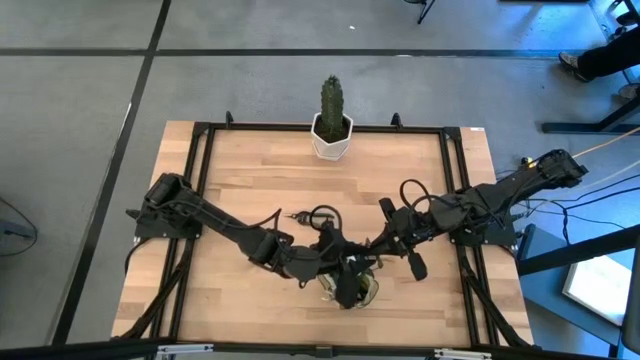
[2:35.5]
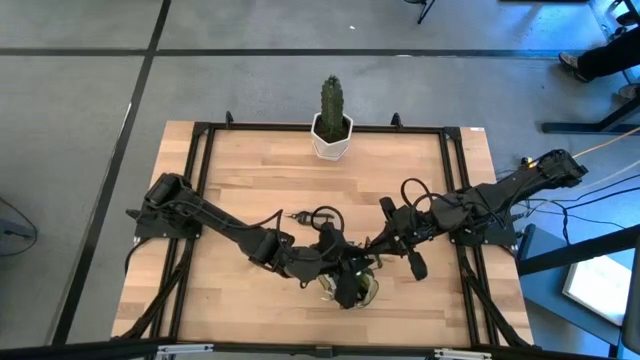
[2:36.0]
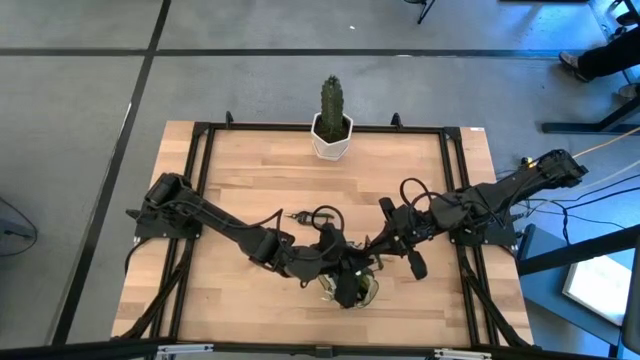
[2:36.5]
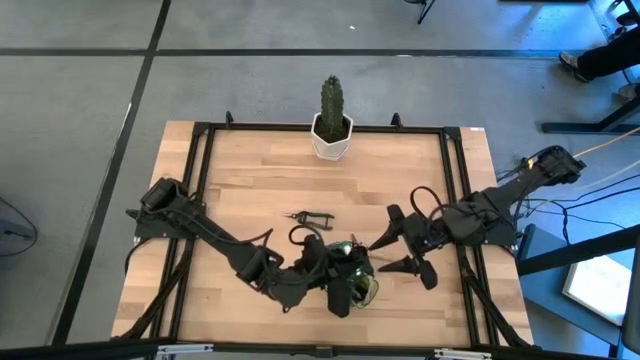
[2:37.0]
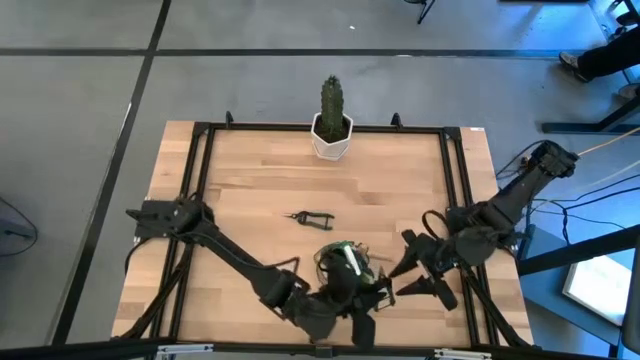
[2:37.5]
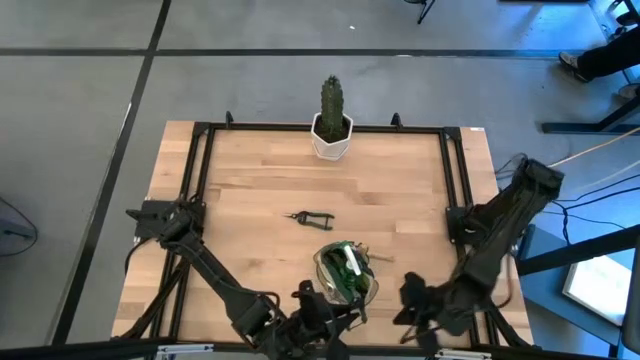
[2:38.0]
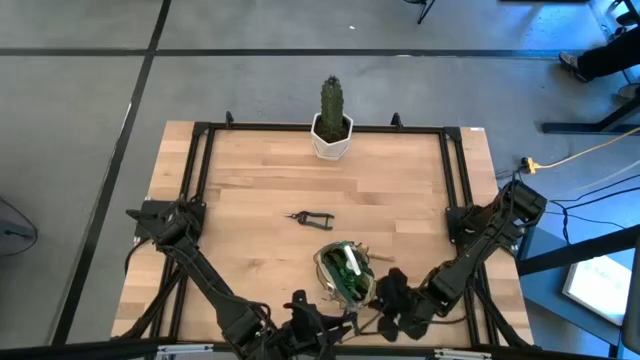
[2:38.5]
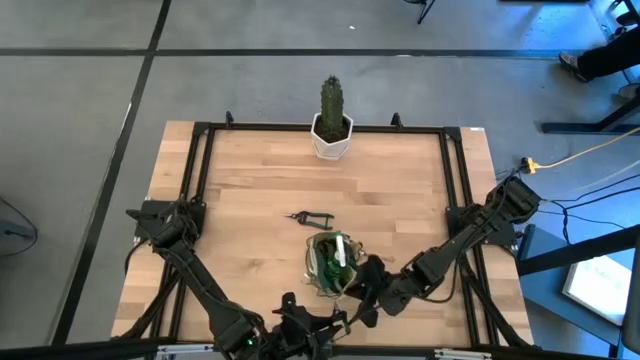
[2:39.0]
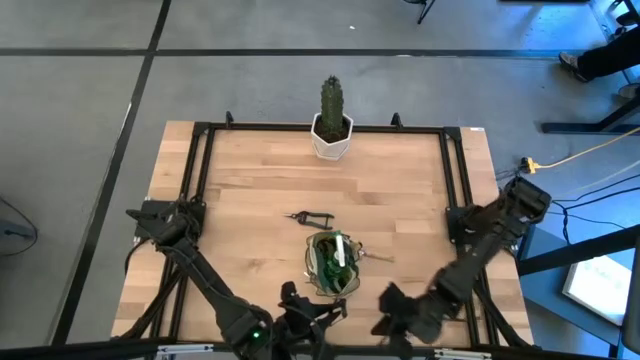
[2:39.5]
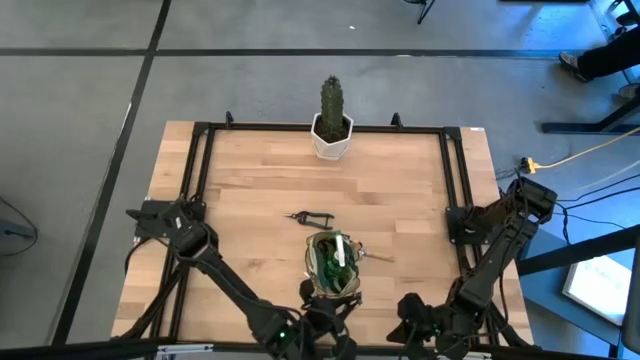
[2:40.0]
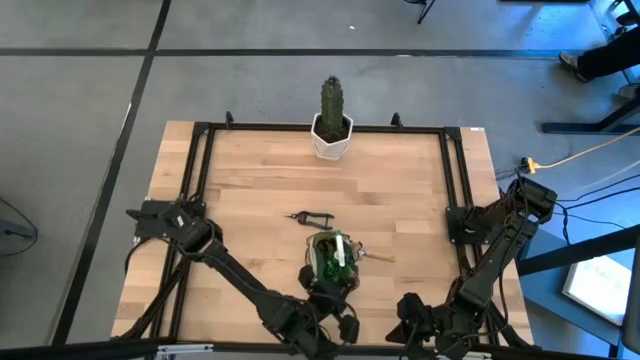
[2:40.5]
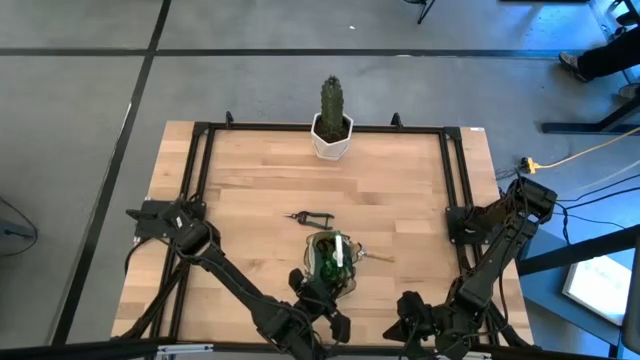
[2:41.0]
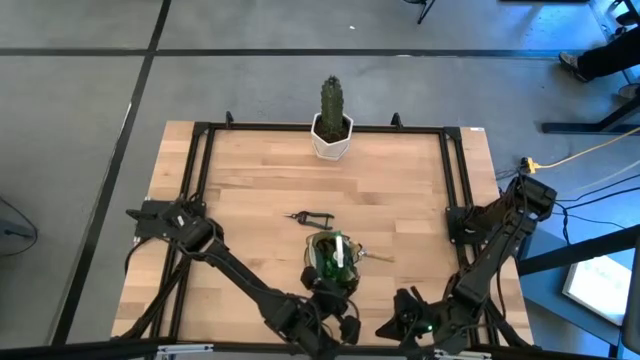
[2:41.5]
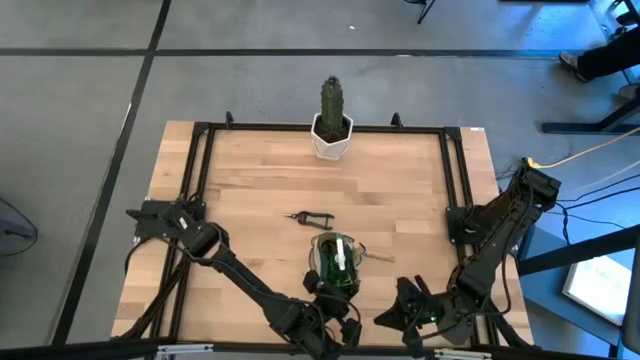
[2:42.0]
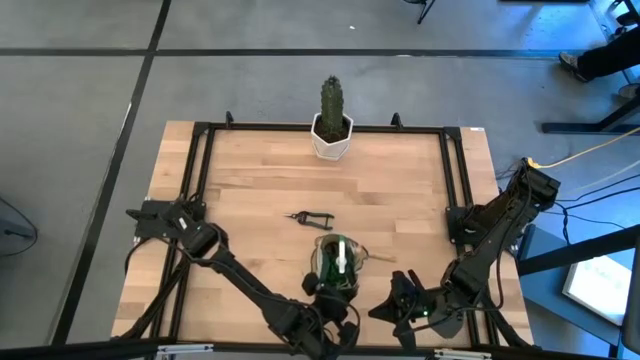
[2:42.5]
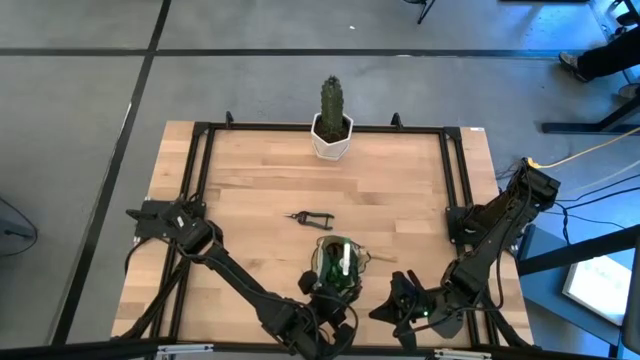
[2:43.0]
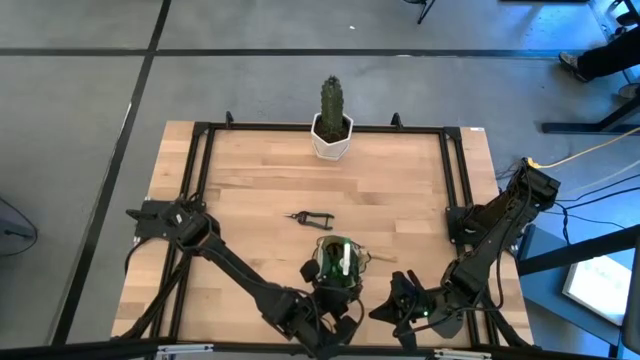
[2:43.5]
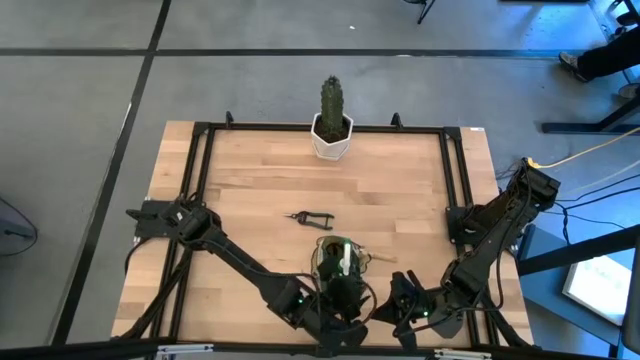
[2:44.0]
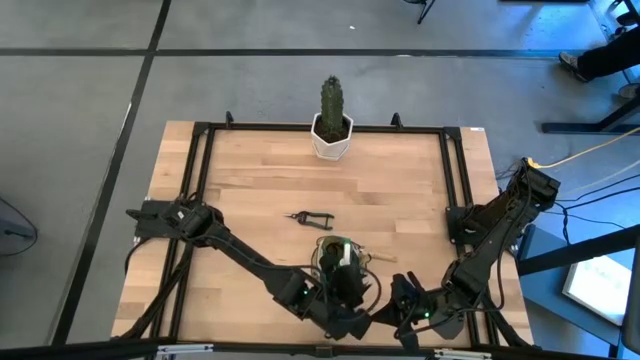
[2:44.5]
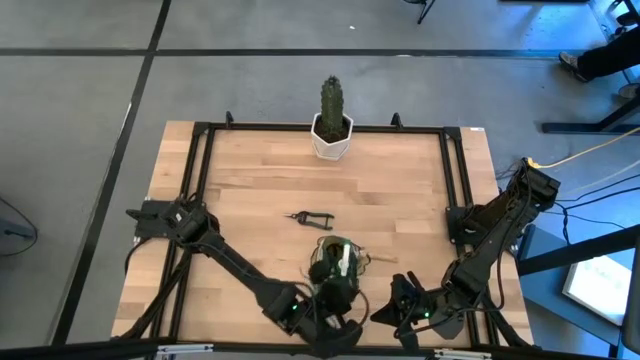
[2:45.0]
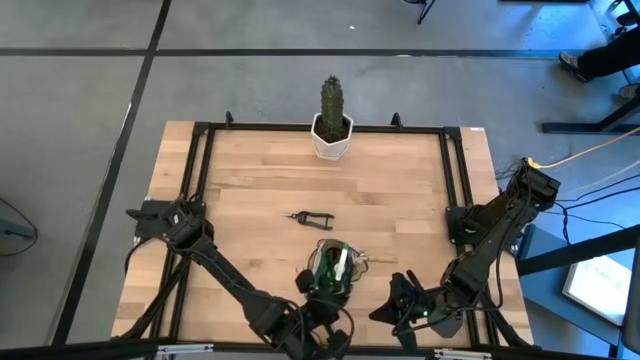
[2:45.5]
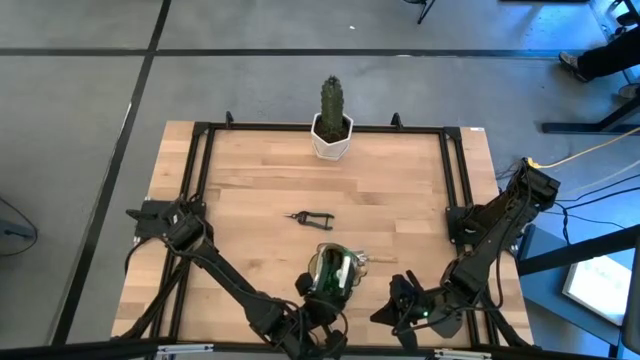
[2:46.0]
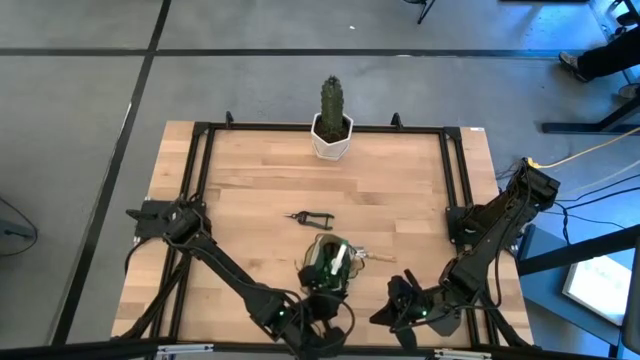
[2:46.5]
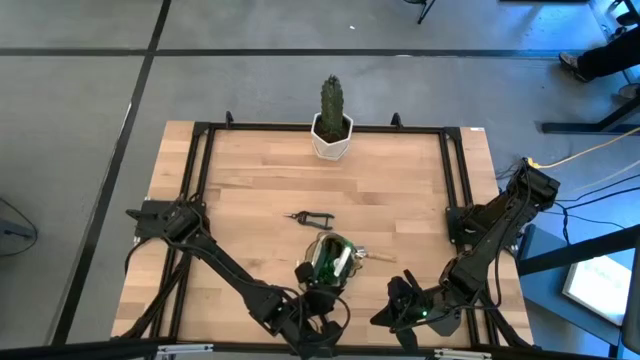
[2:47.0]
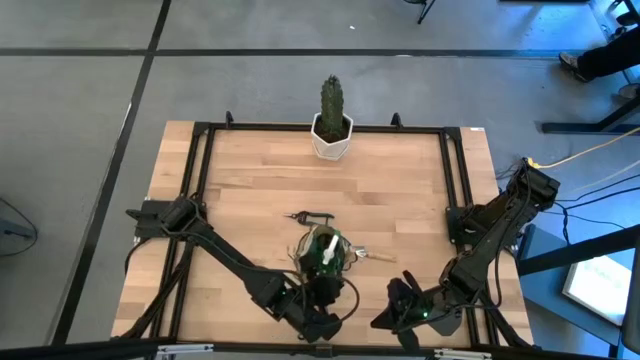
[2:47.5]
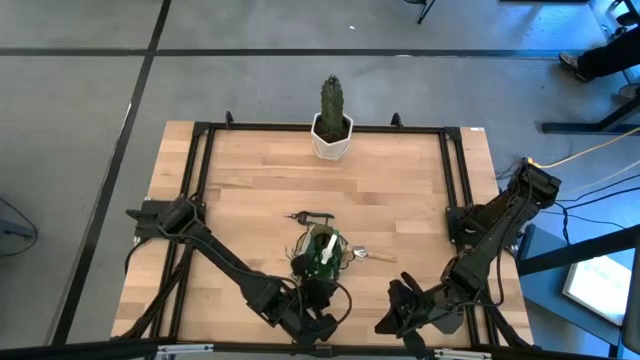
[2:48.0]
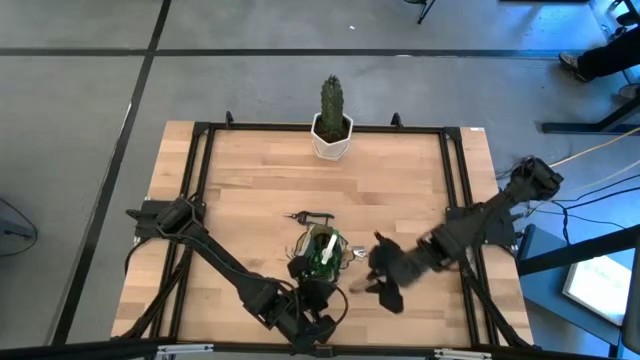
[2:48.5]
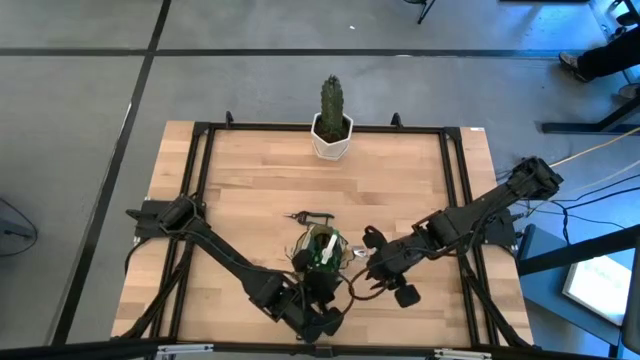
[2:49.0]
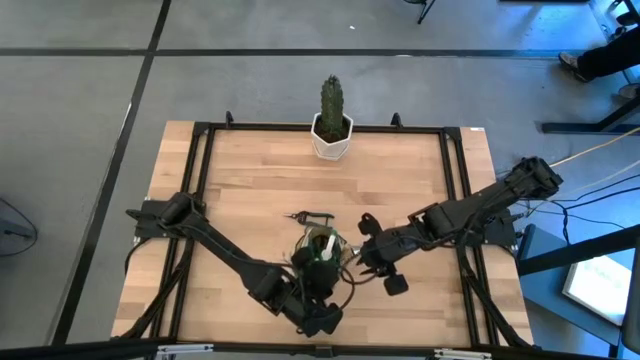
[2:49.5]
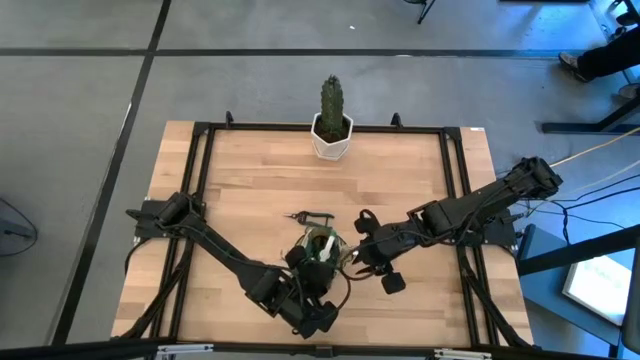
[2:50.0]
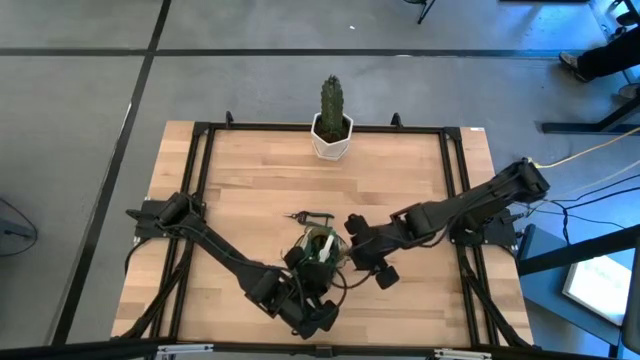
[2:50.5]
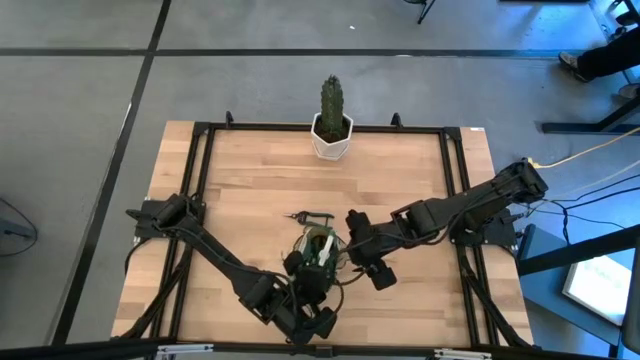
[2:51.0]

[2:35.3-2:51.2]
Task: Pick & Place Garden tools in Gardening bag
Put the shear scissors into the gardening bag

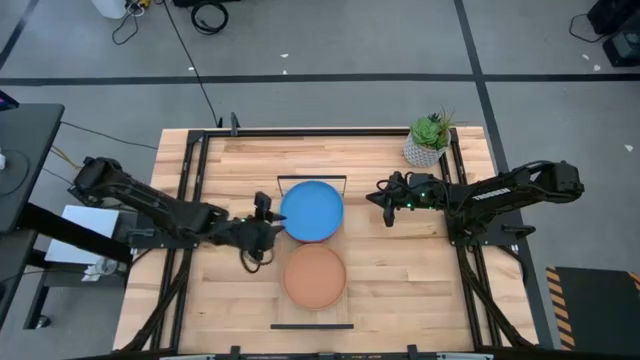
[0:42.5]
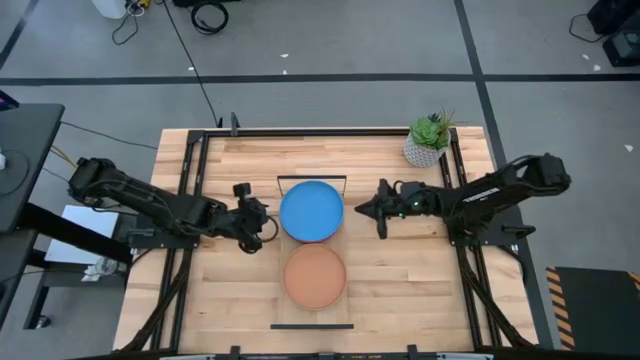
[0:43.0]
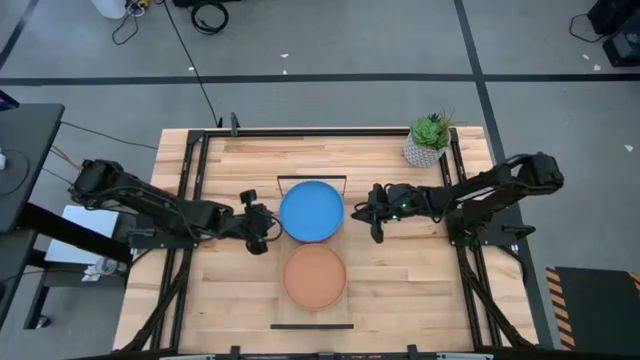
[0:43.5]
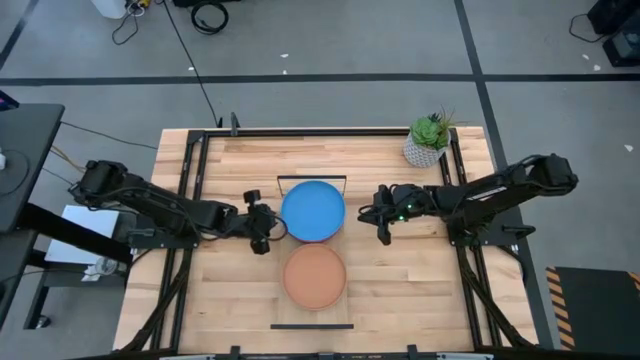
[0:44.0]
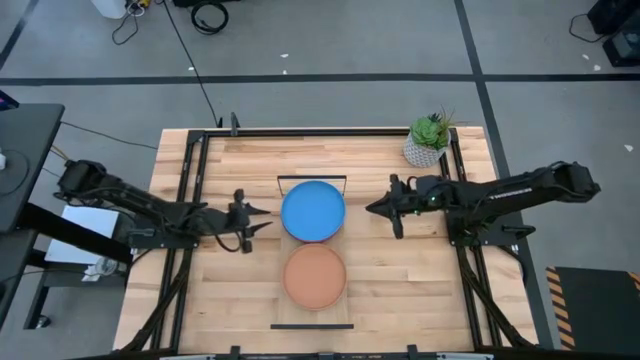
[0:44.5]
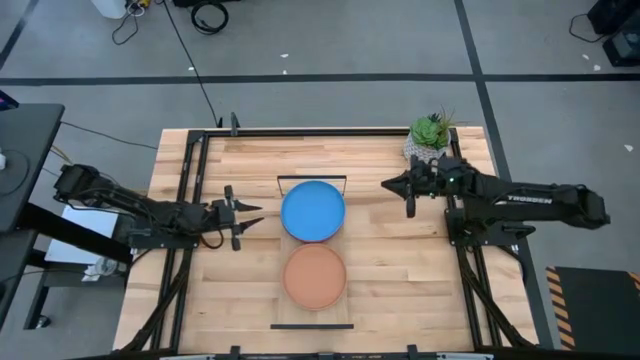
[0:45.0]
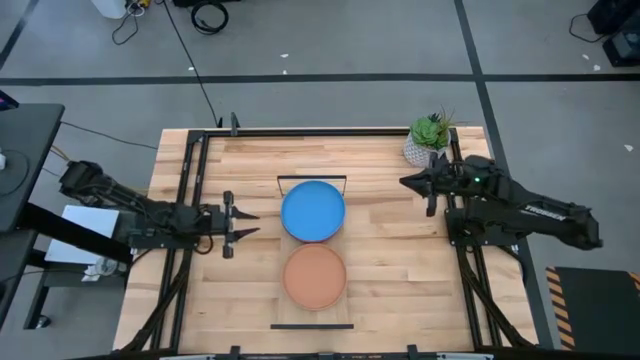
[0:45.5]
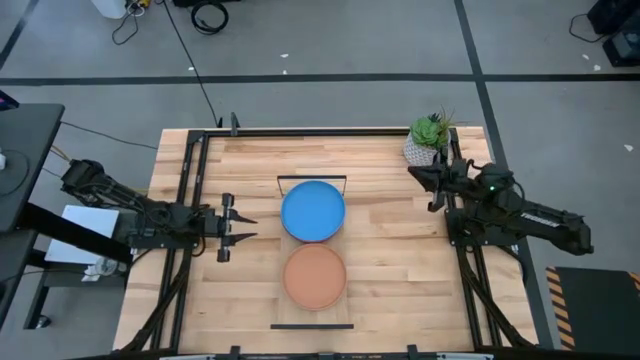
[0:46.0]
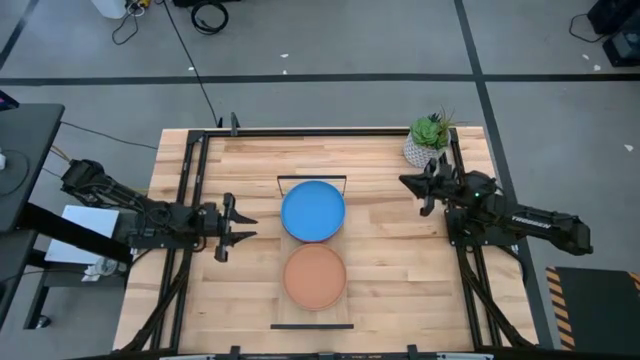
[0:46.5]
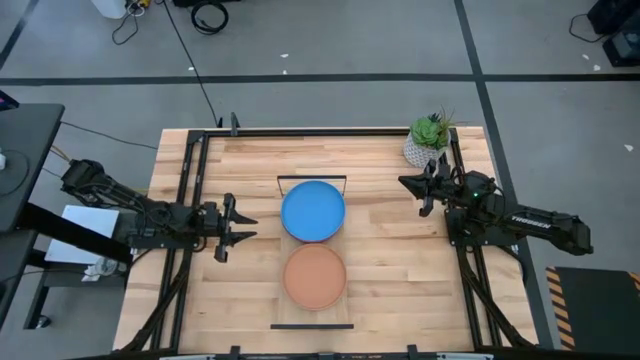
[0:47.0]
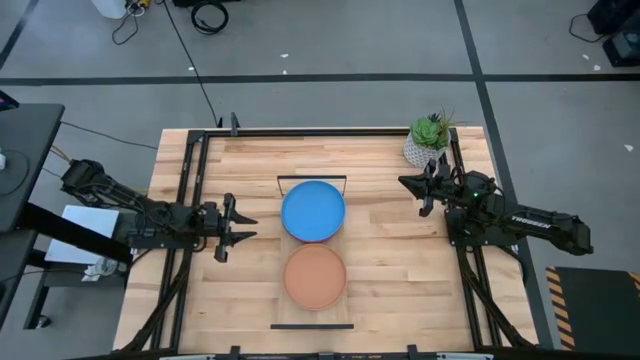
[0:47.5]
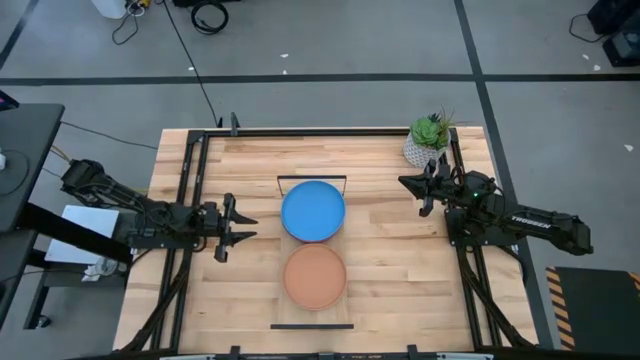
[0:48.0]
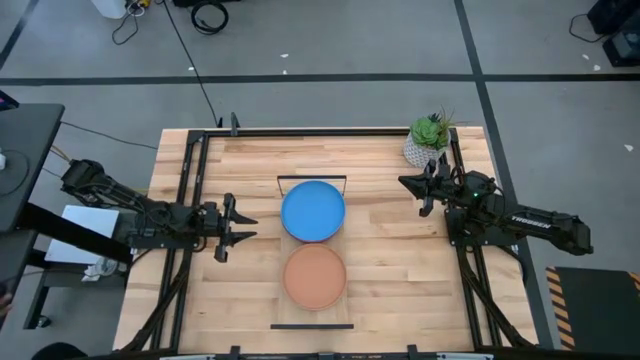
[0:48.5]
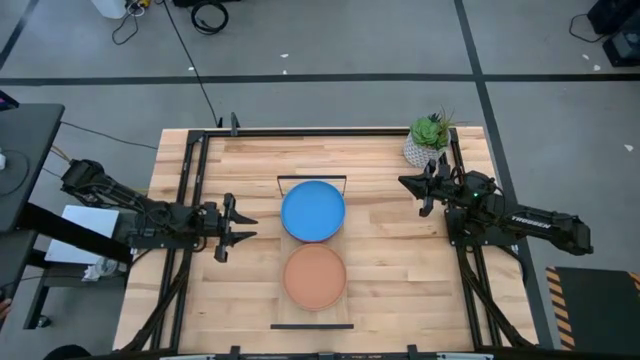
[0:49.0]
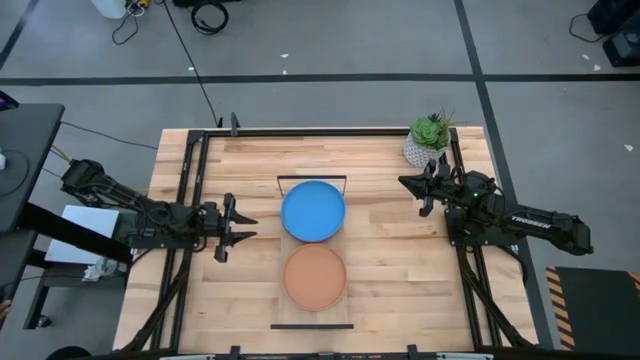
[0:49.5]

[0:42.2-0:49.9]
Task: Place and stack plates onto a shelf
Return to Home Position
